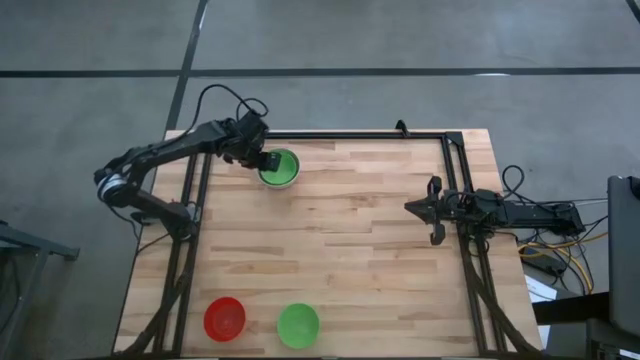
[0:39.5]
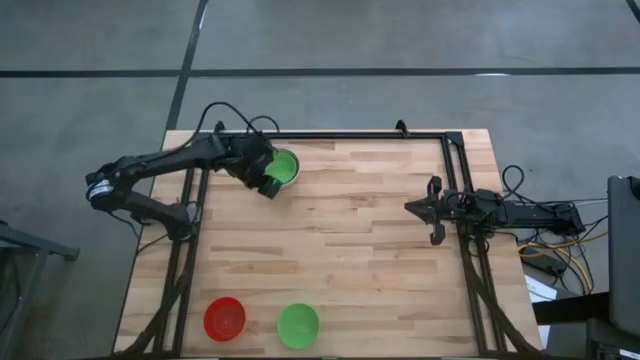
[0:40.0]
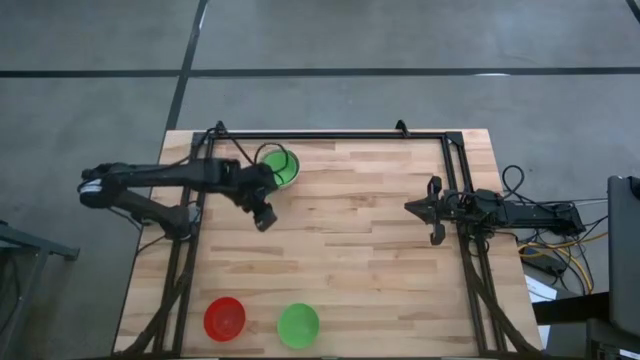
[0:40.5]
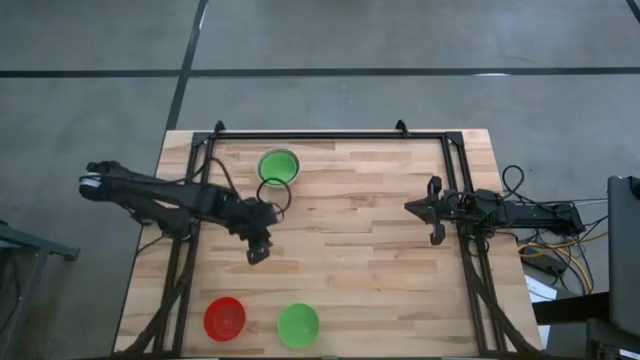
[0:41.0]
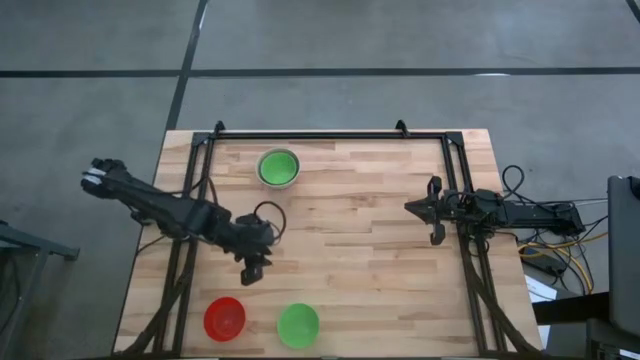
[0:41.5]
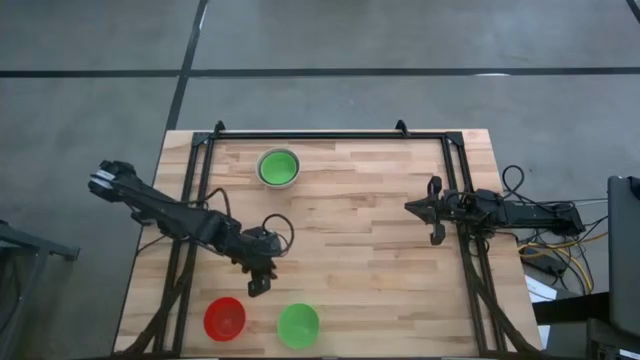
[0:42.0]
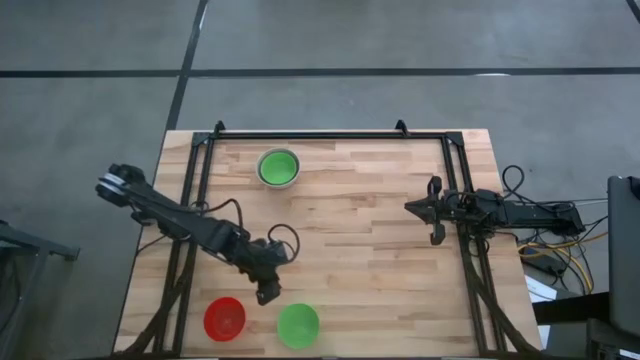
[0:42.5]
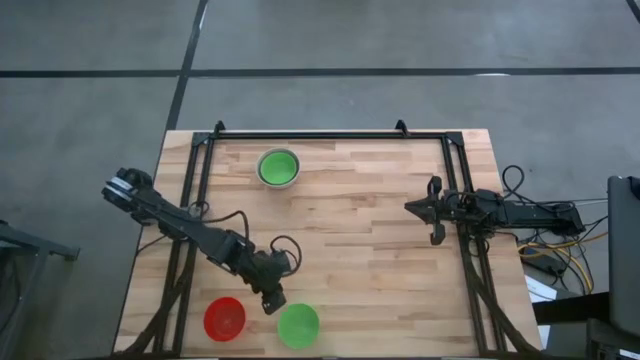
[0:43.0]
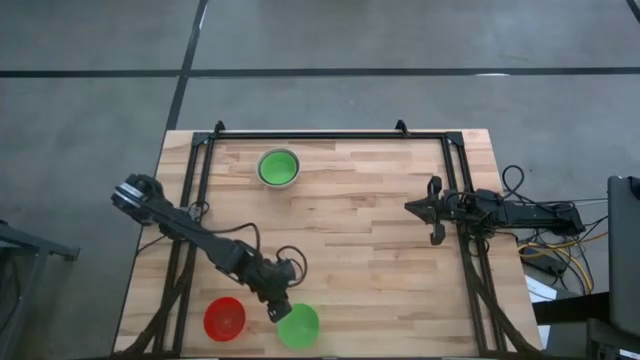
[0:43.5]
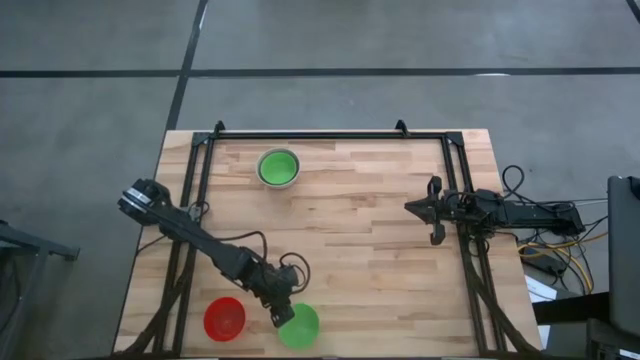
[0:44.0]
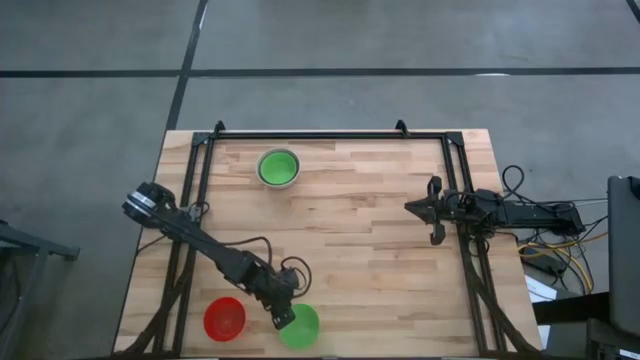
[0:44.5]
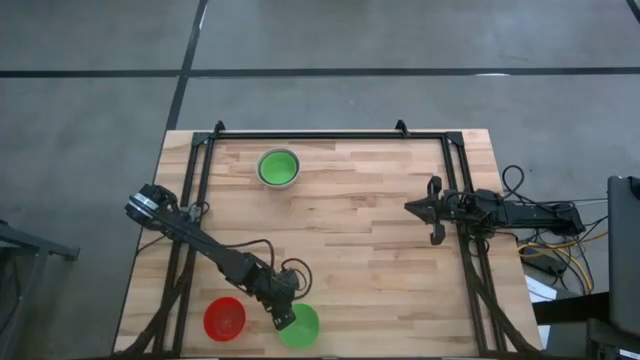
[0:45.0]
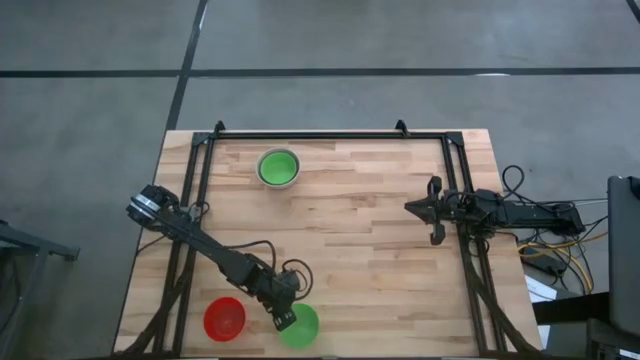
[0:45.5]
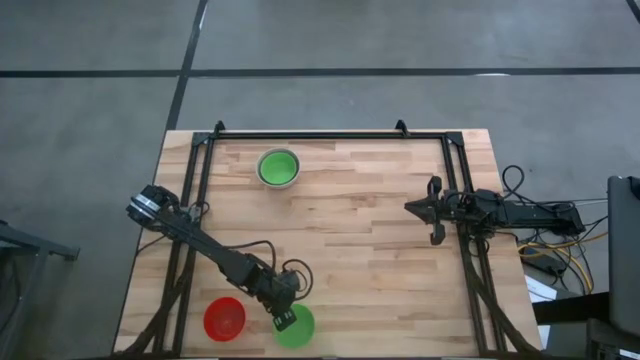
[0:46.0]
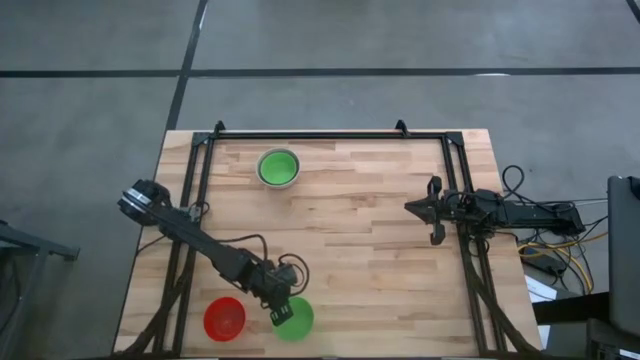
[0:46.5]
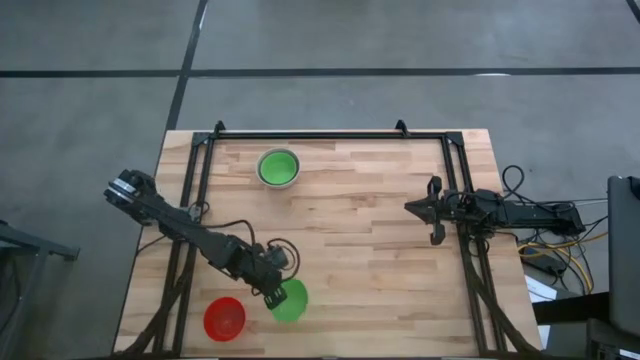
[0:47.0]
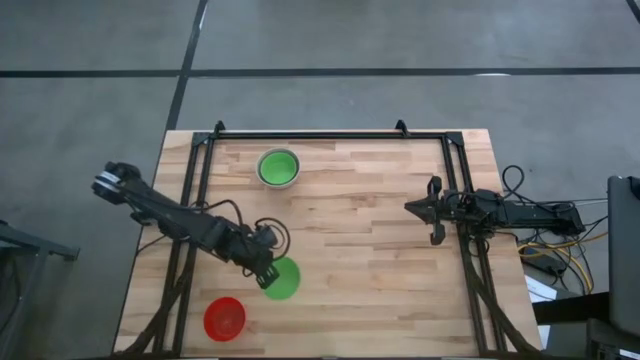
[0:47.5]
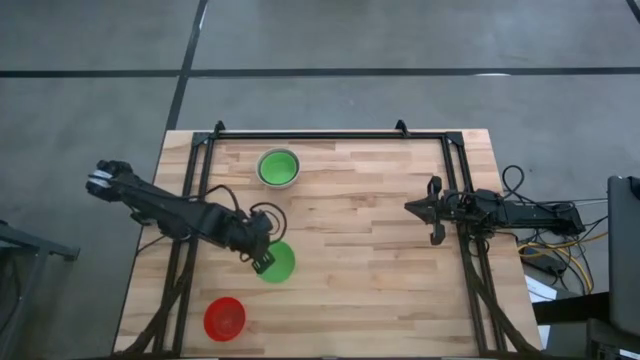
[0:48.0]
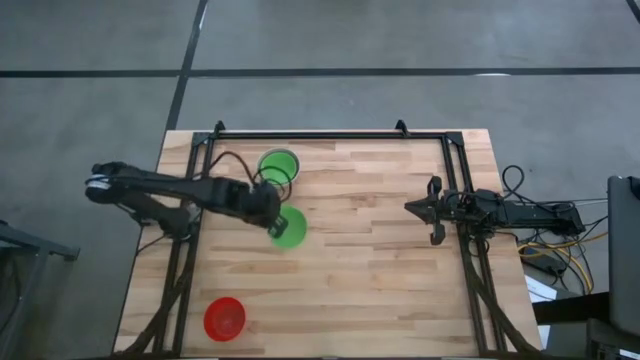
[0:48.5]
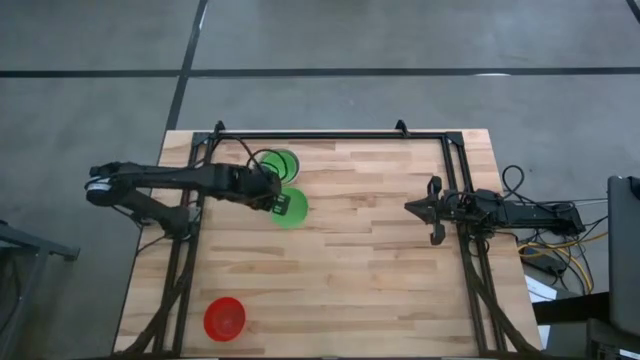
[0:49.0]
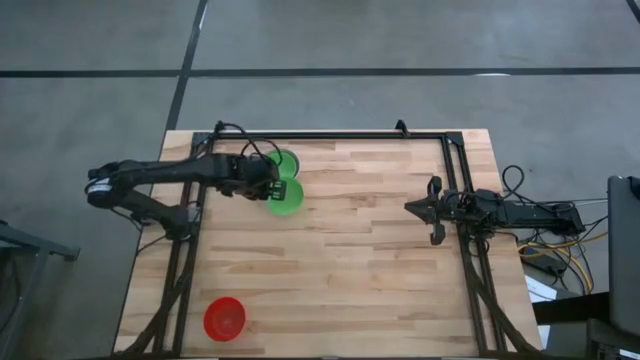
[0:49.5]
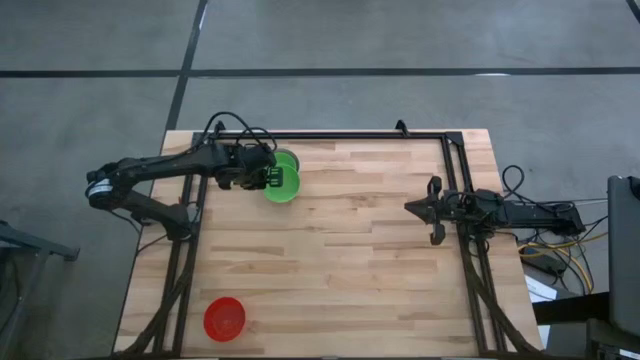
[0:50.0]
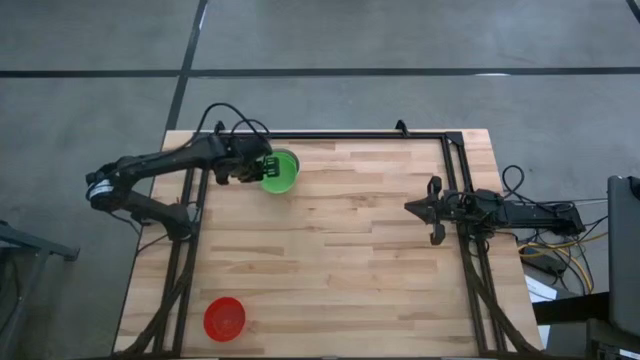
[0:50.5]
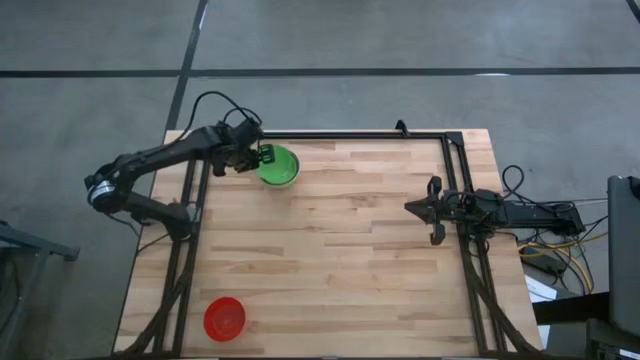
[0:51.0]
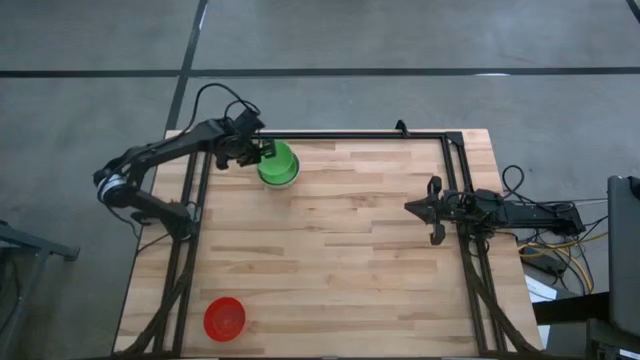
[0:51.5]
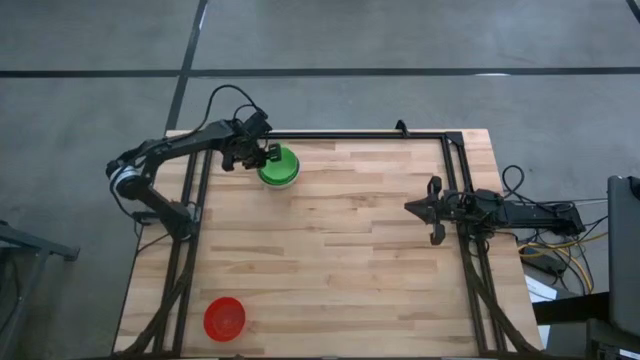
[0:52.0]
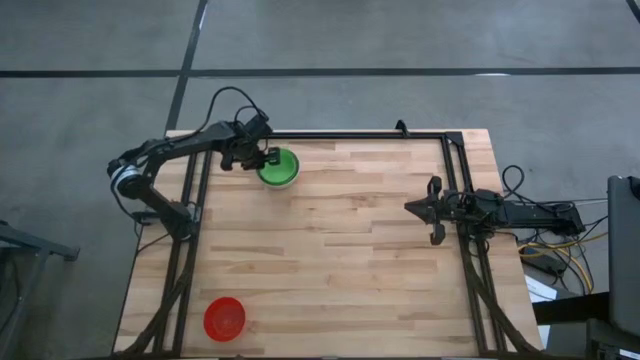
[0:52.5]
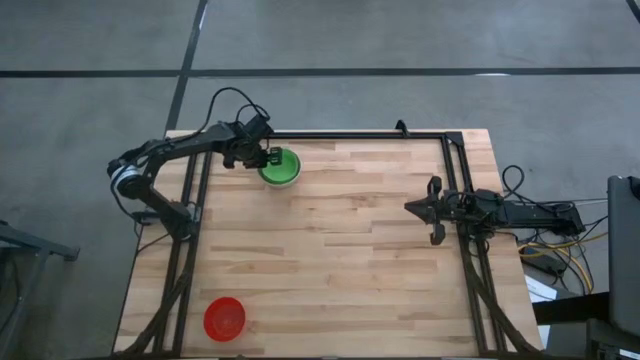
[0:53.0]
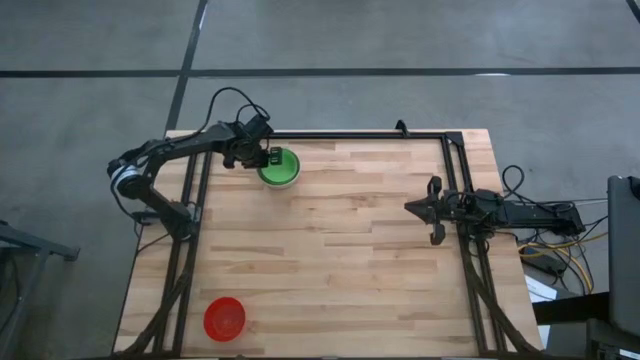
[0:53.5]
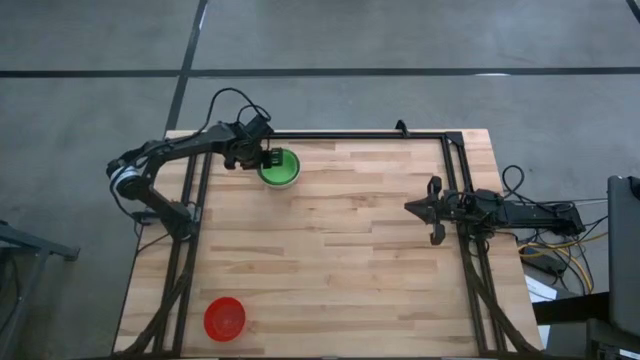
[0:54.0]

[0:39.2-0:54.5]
Stack the green bowl on the stacked green bowl
